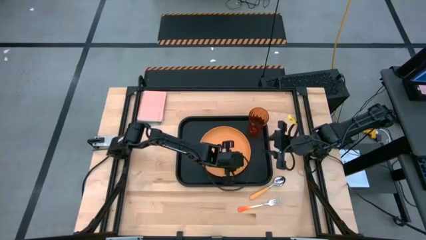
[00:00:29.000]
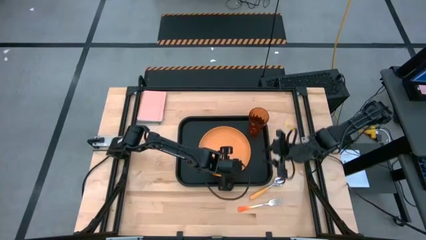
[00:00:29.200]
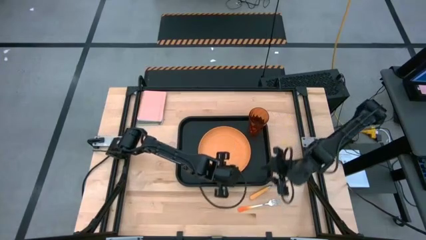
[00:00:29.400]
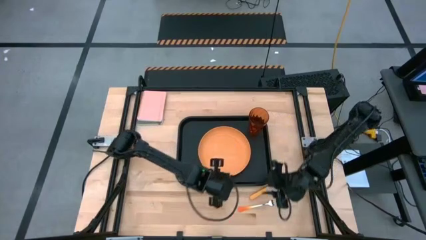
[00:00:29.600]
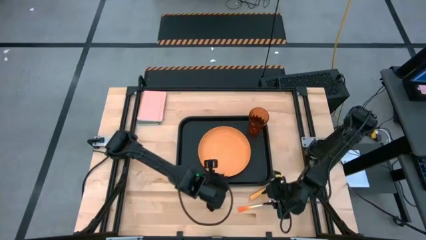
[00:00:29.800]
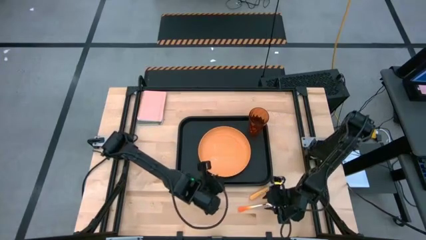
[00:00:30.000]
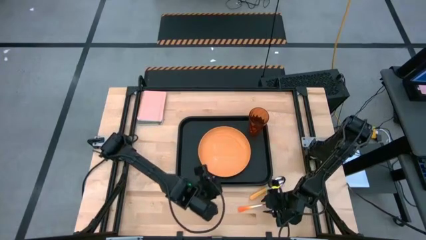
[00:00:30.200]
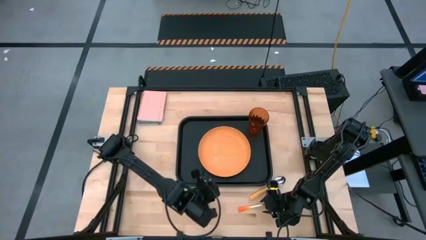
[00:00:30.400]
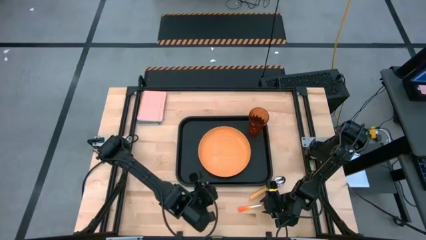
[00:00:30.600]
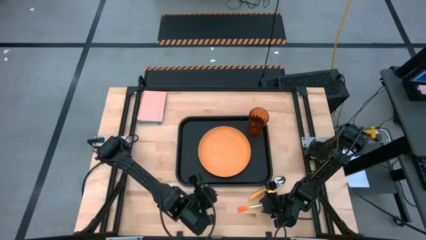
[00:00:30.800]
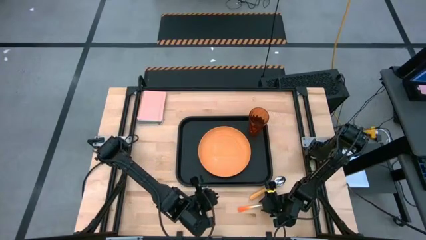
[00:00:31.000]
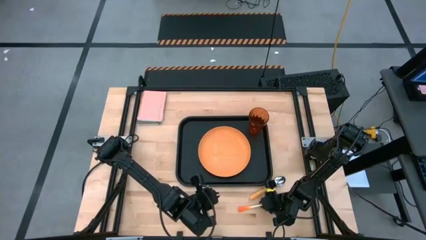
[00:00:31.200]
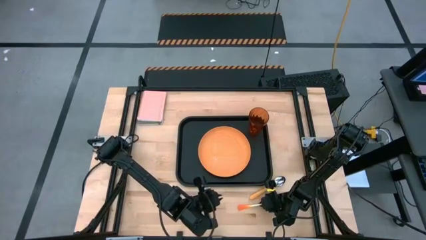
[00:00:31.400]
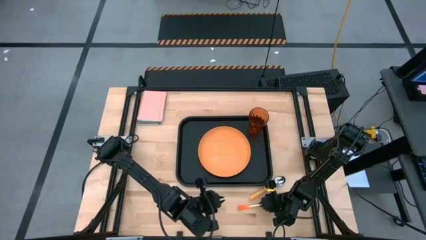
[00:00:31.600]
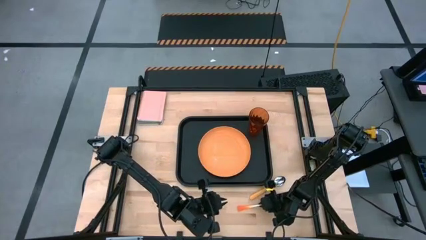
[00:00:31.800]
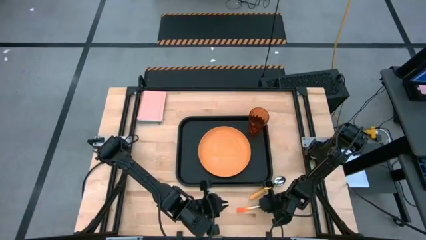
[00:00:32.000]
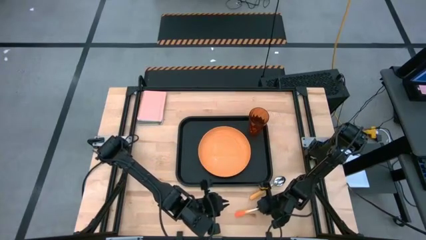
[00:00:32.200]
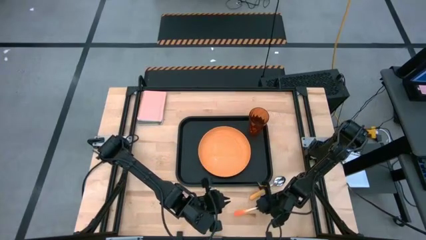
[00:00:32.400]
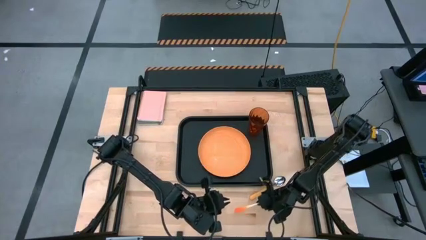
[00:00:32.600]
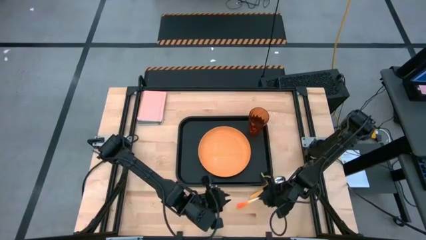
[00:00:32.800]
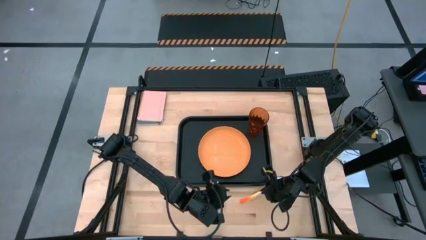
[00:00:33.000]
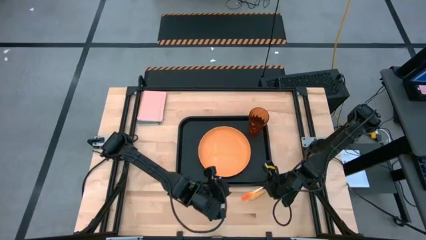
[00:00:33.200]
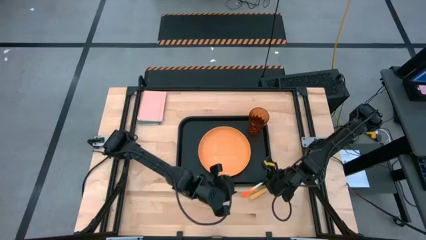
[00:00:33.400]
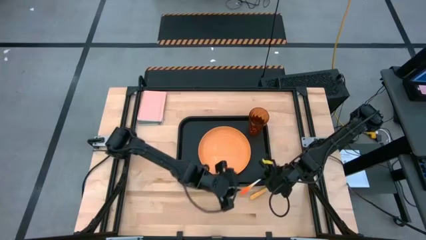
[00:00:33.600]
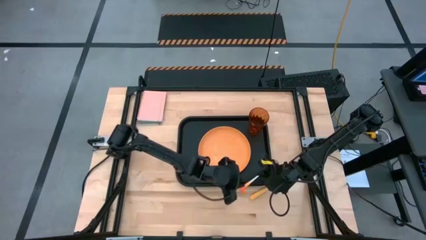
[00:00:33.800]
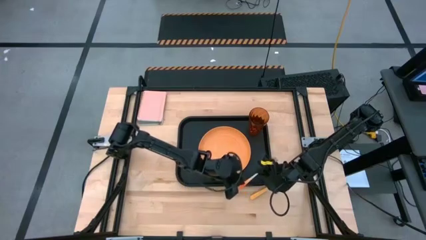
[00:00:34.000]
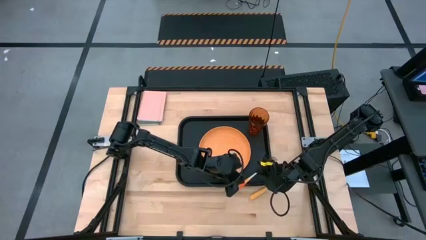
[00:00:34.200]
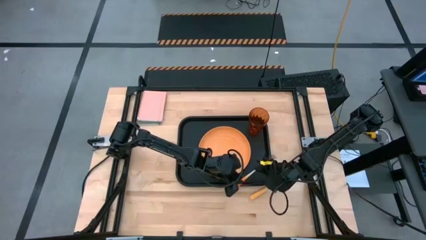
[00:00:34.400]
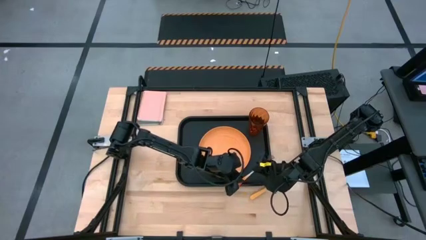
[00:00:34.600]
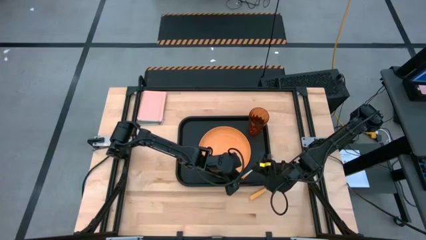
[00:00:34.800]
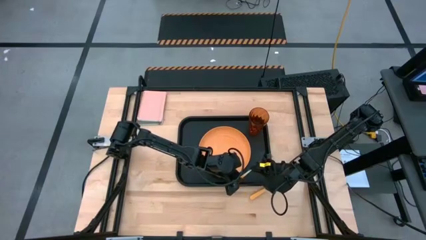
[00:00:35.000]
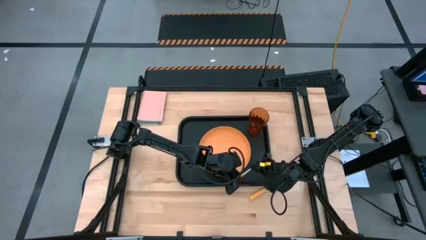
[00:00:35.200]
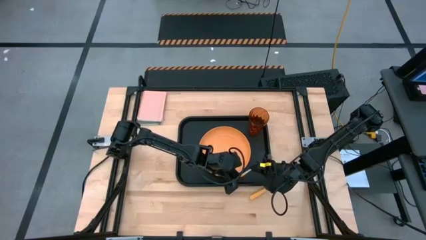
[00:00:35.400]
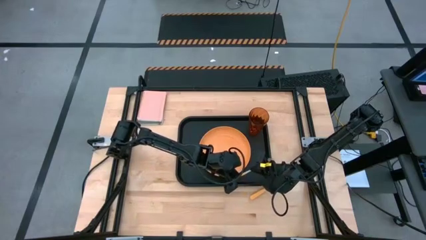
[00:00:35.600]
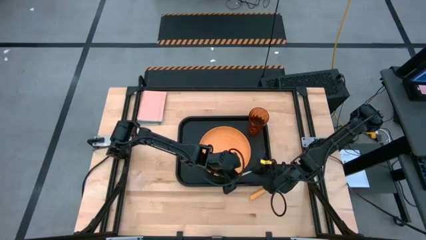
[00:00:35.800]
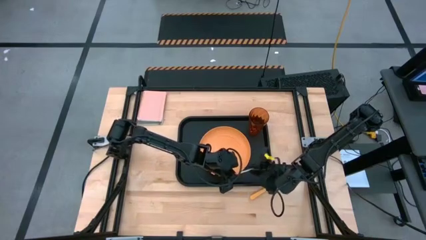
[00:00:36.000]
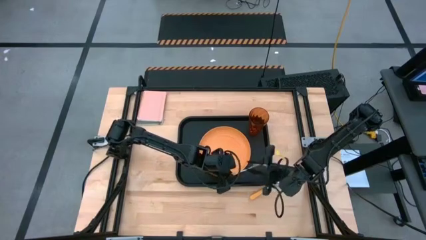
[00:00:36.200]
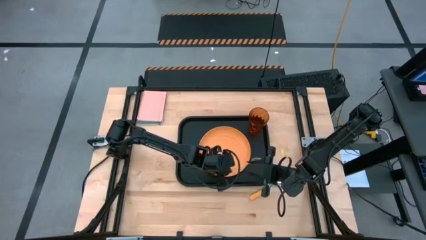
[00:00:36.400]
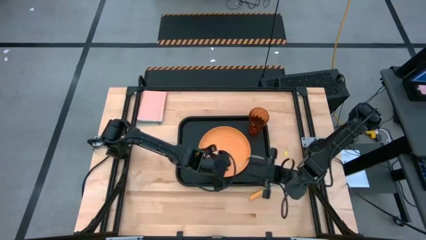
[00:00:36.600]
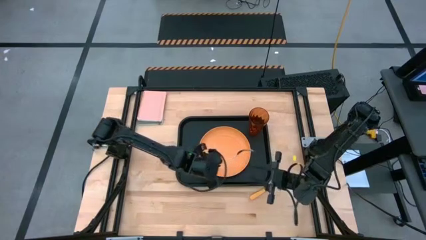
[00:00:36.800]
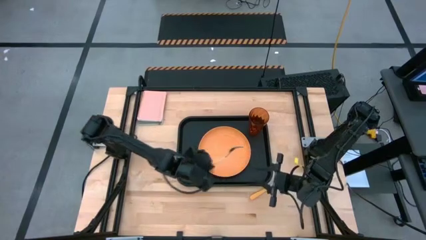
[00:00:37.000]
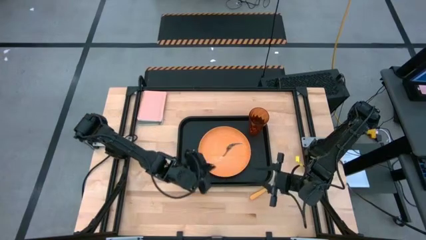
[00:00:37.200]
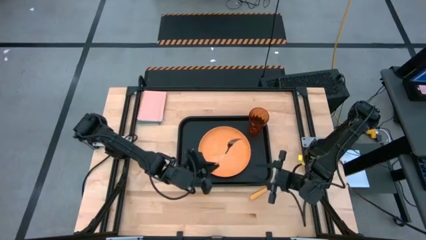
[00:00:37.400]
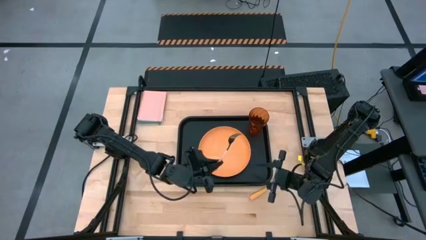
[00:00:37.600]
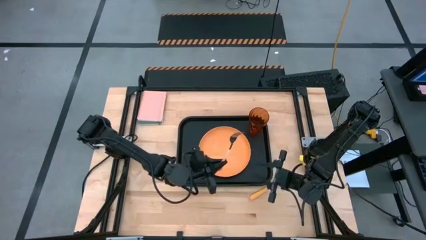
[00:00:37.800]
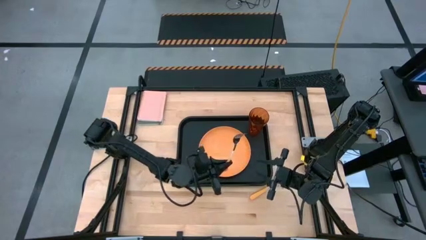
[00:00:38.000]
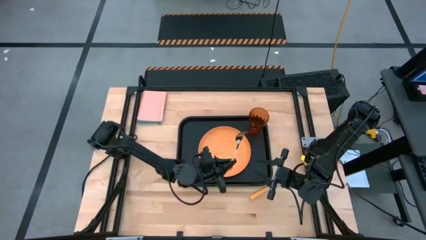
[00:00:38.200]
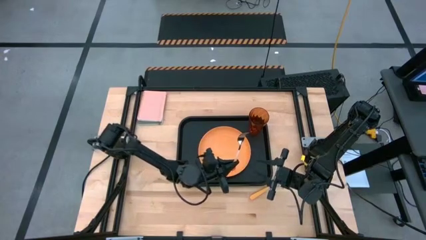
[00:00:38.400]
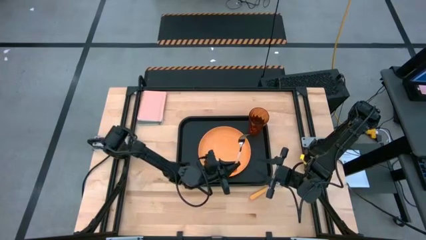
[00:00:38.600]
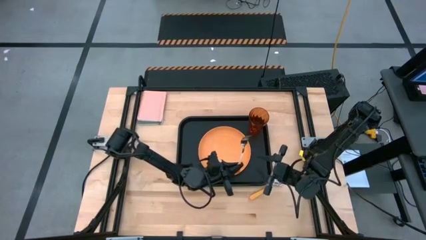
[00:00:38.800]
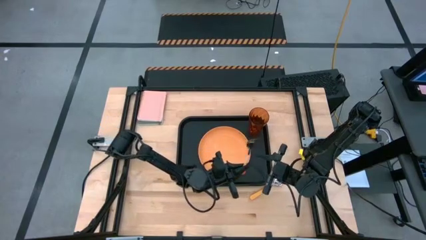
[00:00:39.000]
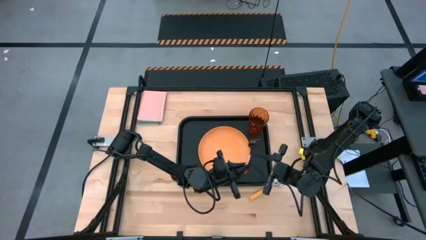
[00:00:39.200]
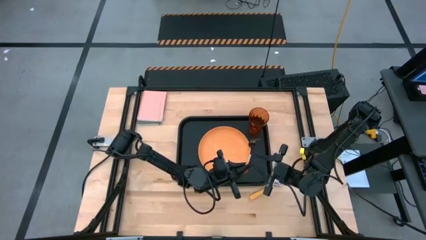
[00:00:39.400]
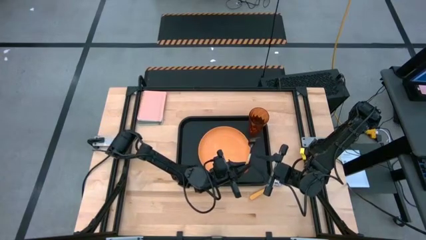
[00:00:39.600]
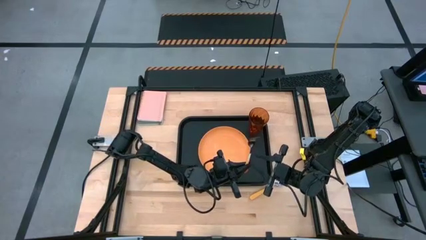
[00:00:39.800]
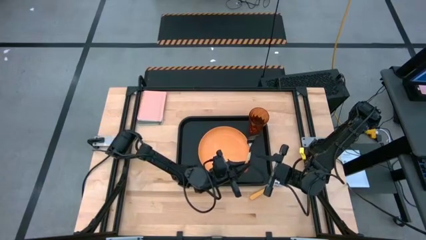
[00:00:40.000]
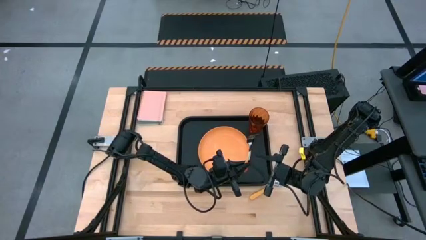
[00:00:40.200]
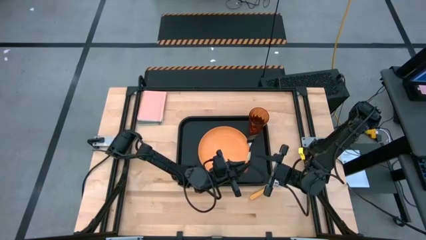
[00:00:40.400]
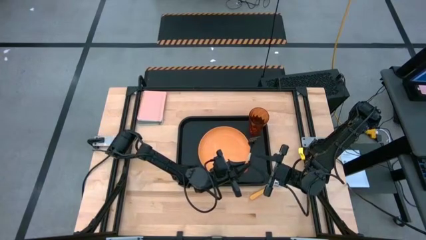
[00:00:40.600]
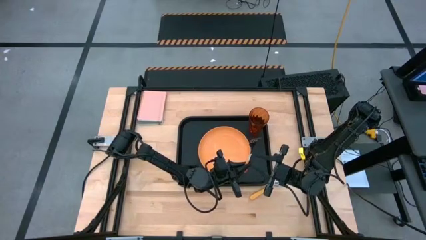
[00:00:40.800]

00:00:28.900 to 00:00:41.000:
Task: Pick and place plate/cup/fork/spoon on tray
Put the orange fork on the black tray to the right of the orange plate

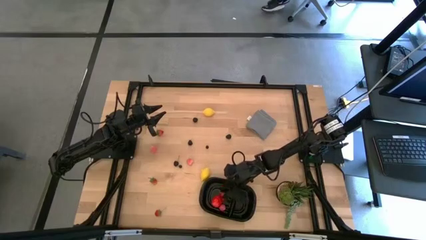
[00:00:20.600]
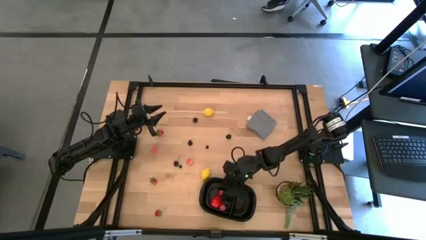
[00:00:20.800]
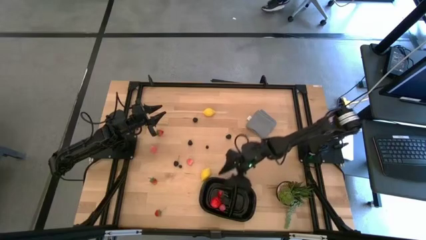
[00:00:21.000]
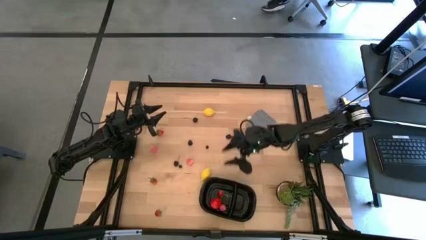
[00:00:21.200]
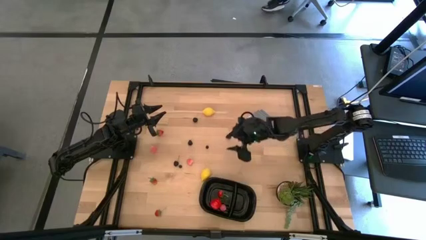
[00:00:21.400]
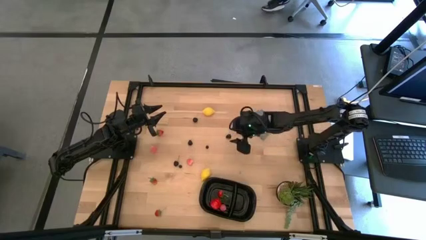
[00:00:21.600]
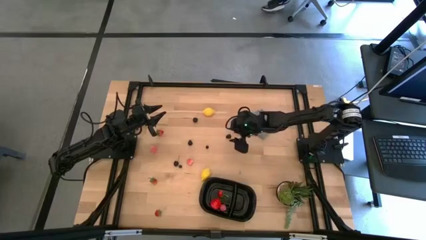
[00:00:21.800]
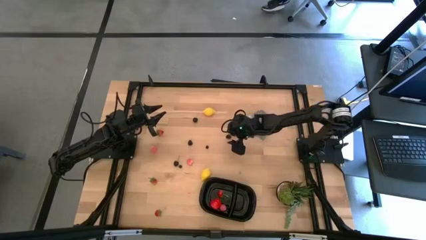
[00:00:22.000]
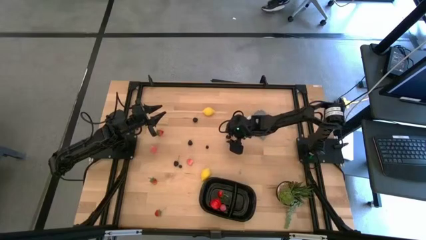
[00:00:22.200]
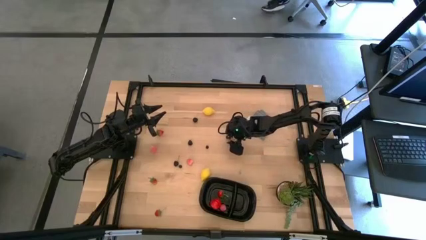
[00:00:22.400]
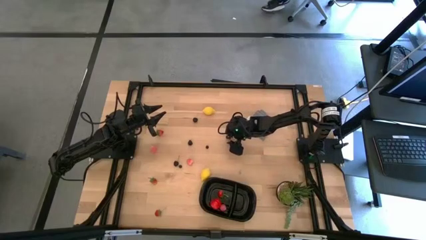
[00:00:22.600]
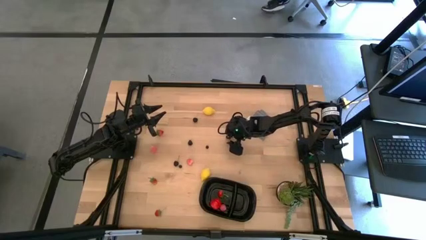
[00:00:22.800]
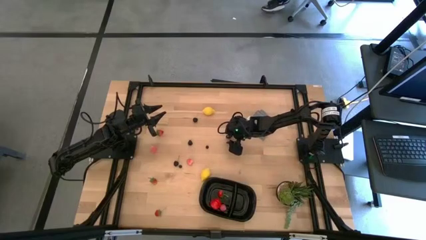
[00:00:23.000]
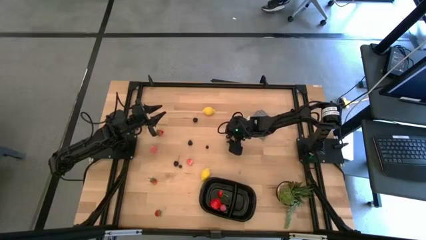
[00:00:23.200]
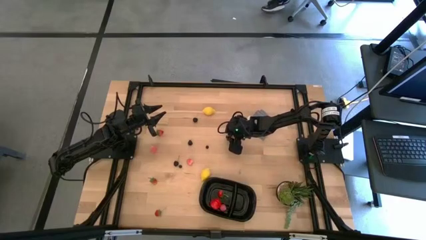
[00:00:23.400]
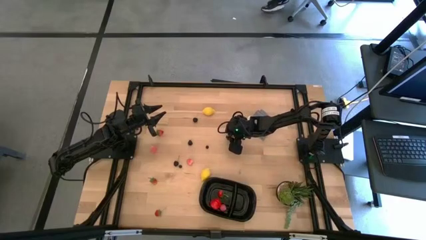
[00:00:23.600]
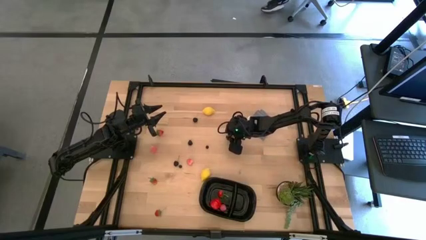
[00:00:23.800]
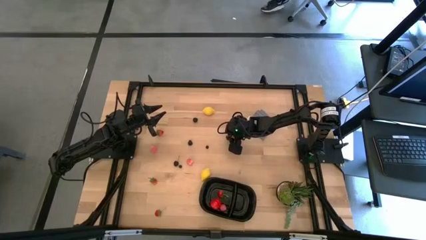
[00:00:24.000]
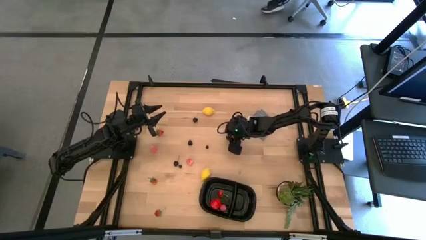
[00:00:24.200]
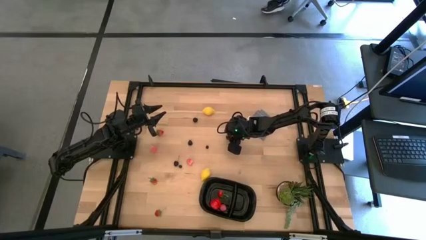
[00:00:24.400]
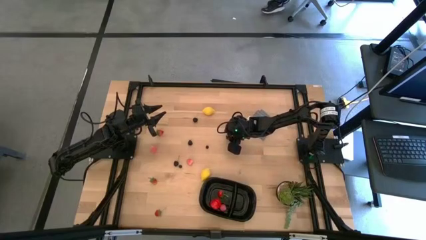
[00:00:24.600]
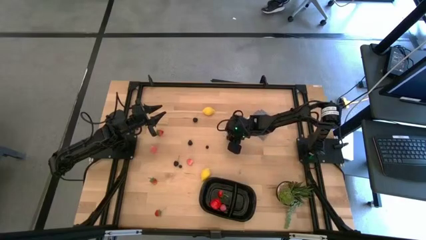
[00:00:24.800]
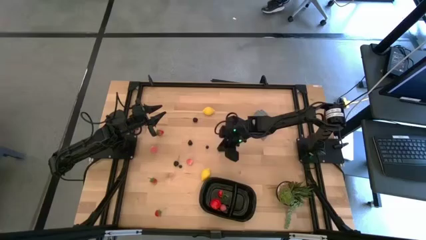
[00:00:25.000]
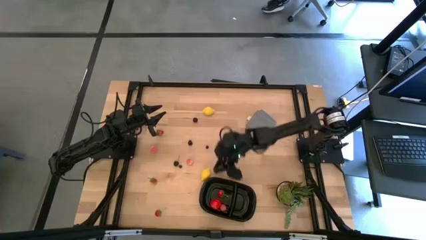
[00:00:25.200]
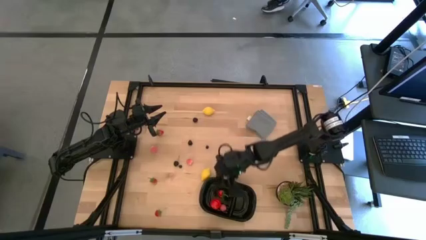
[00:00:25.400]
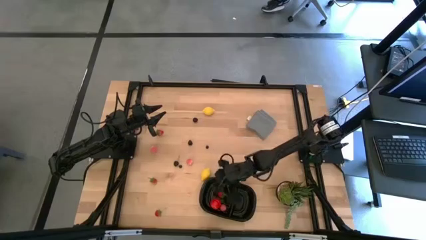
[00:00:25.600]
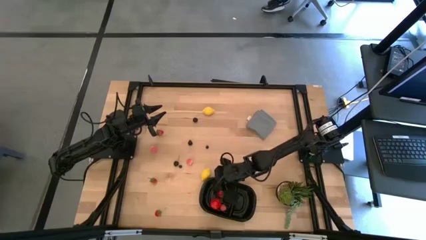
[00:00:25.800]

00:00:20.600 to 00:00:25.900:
Task: Pick and placing Produce into tupperware
Put the blackberry into the black bin
